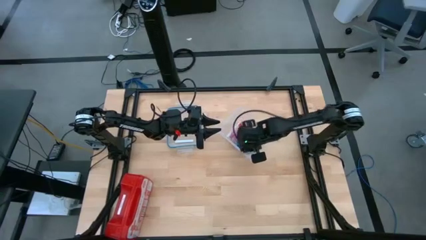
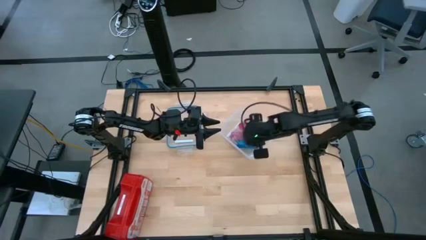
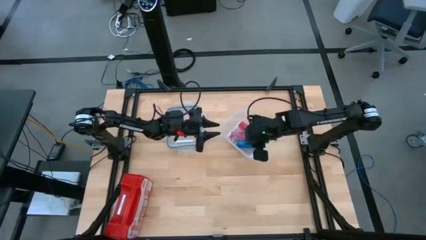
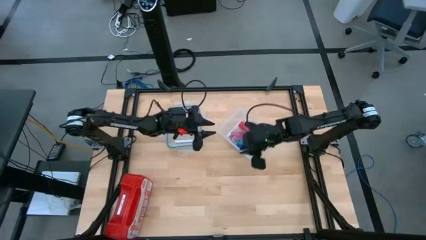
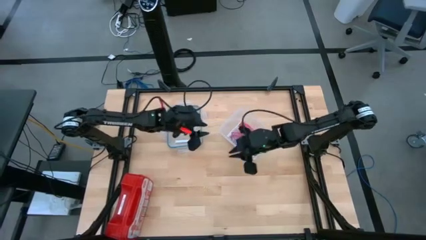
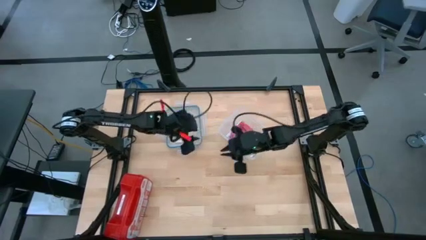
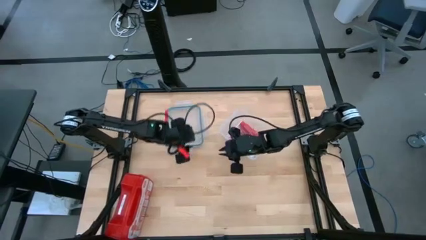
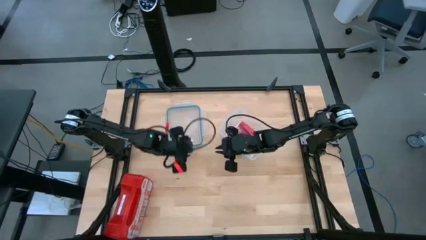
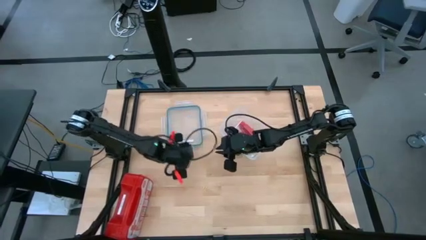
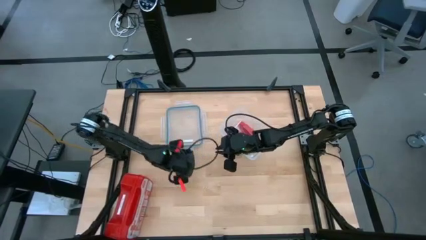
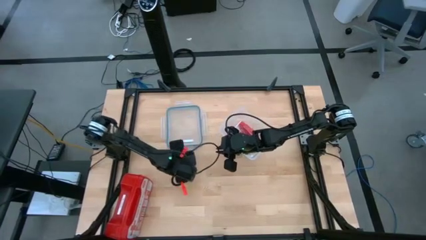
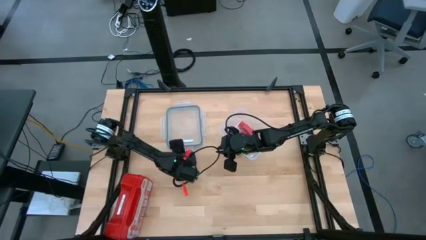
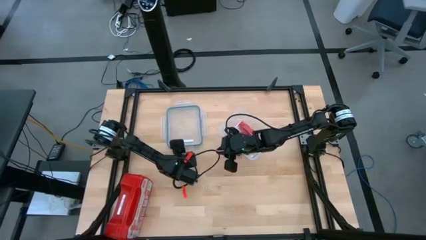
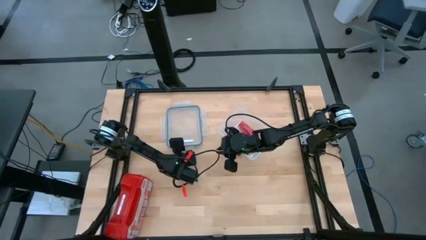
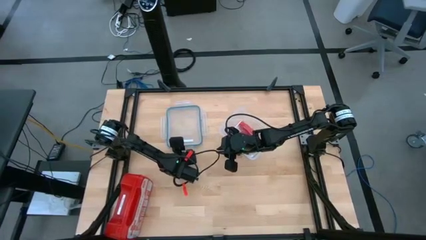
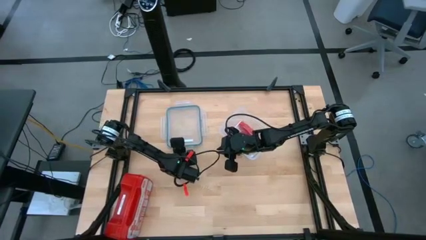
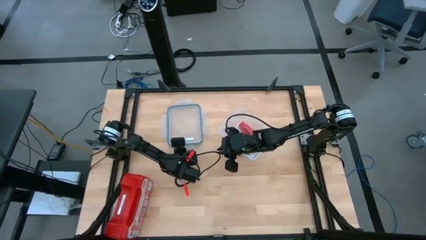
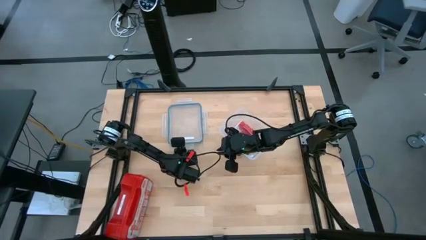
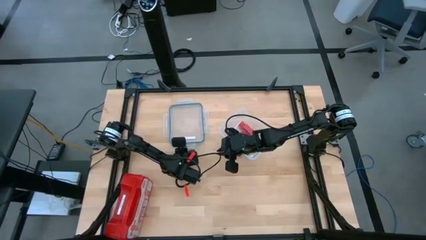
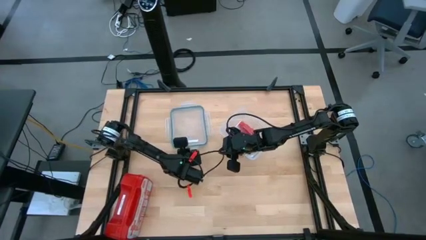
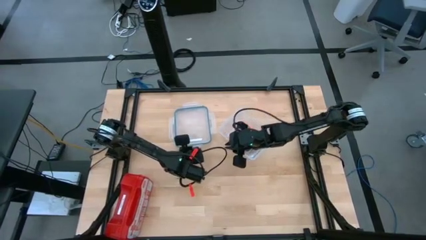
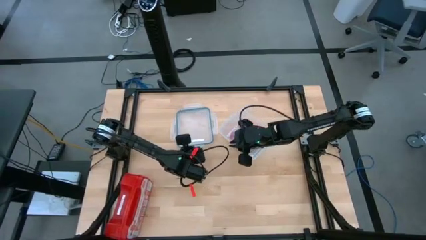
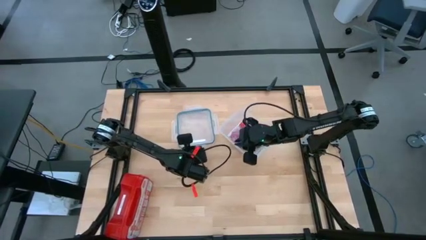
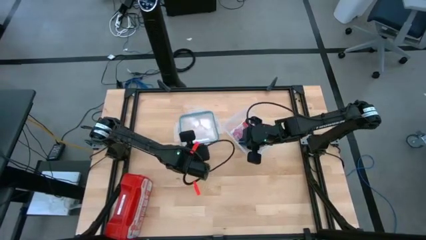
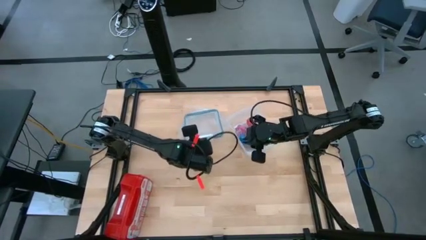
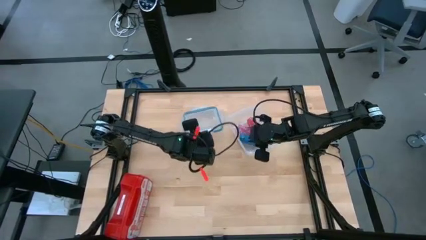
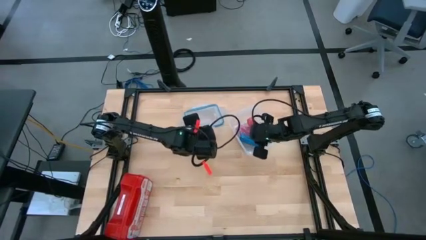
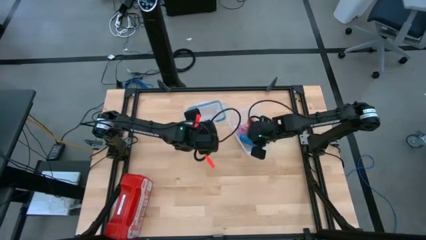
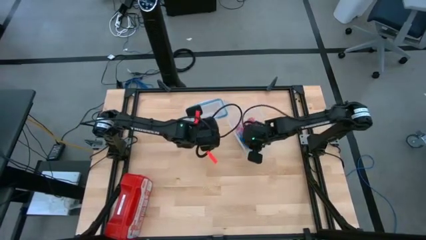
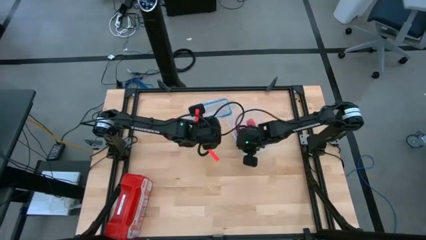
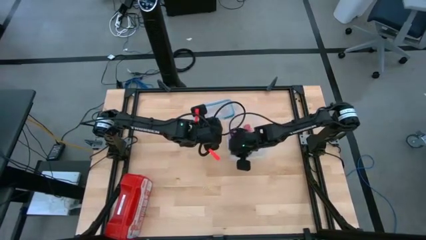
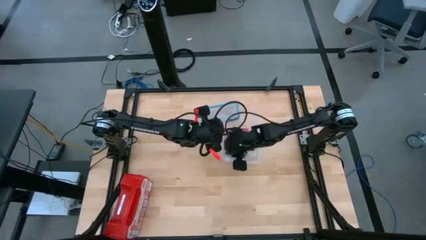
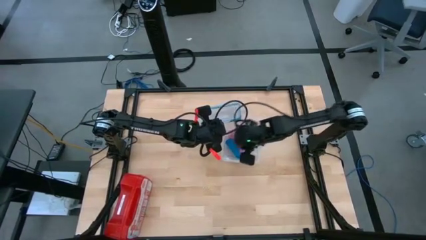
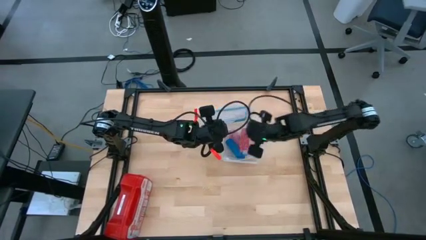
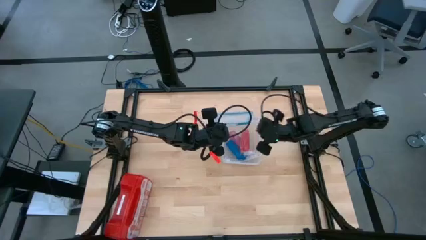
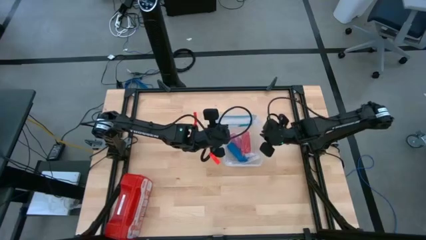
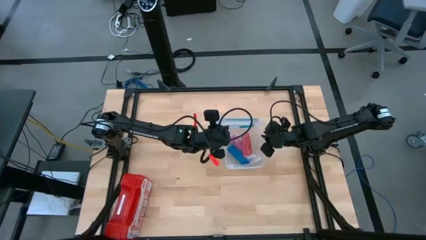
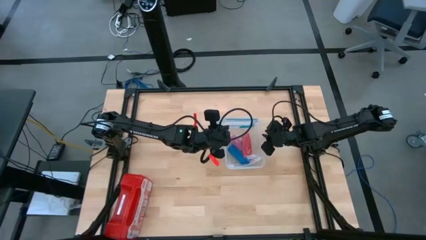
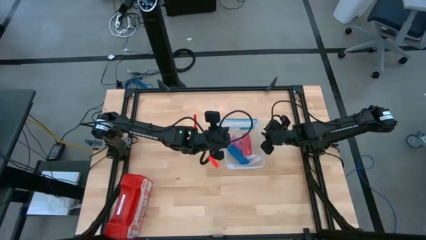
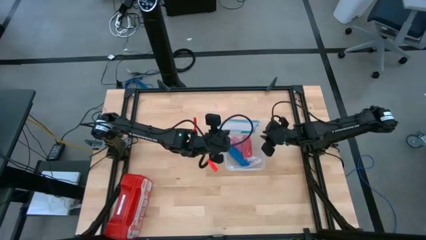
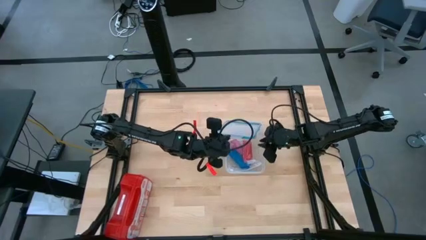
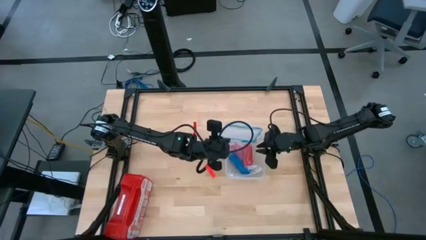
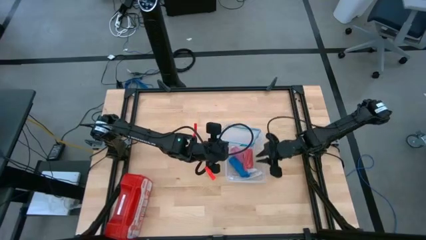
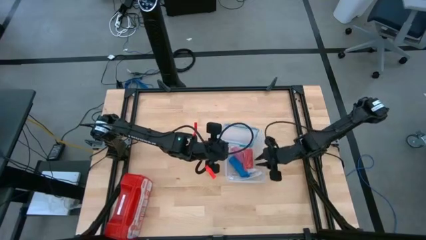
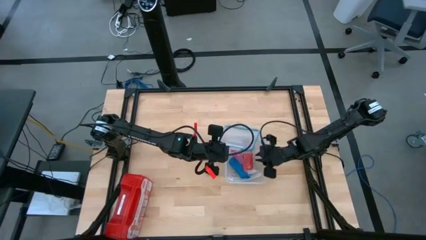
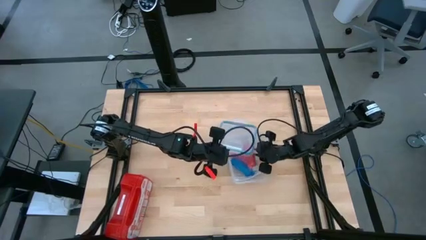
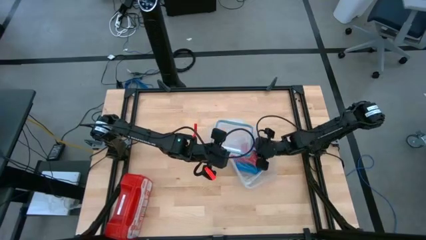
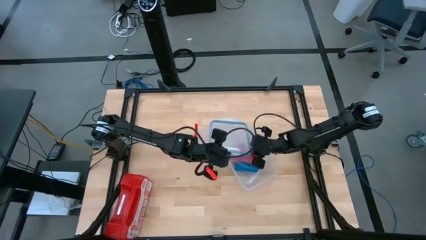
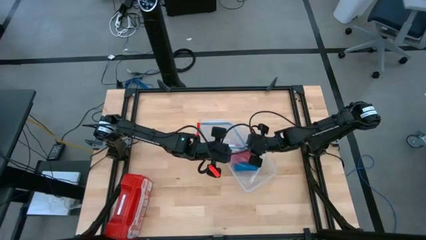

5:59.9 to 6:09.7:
Task: Roll bandage
Close the transparent container

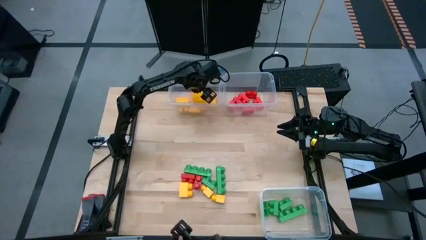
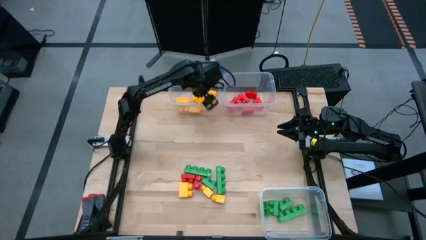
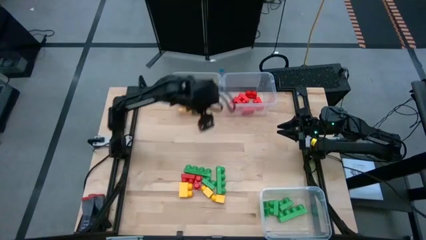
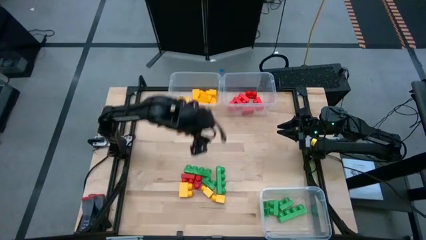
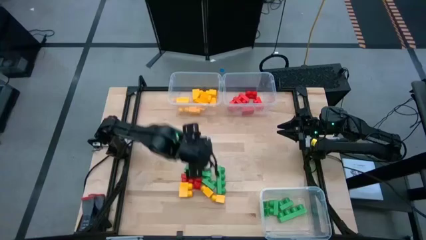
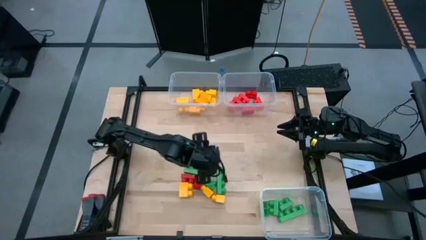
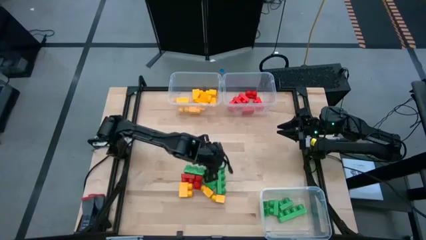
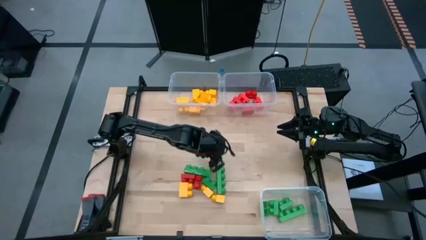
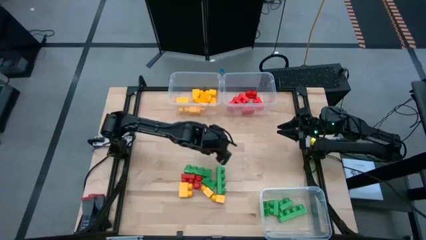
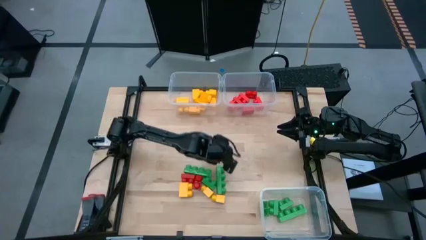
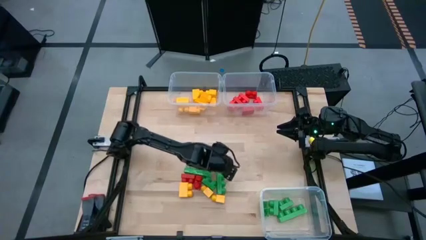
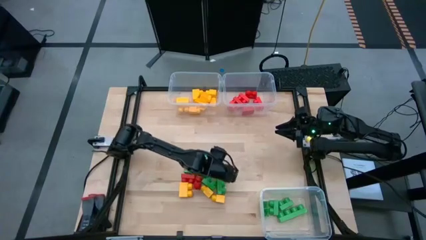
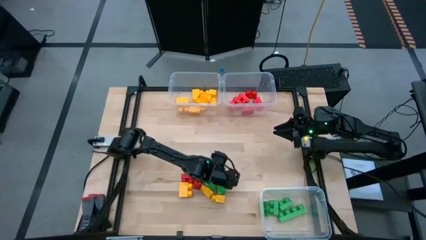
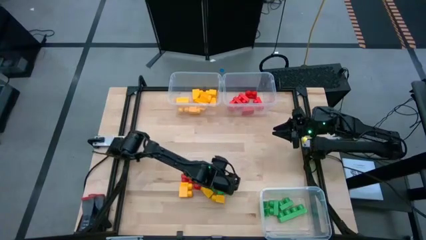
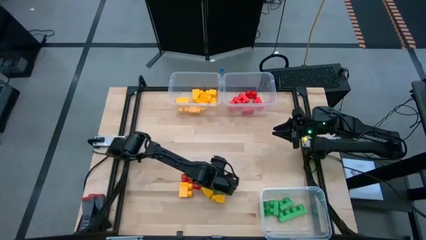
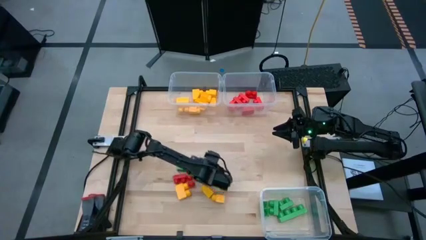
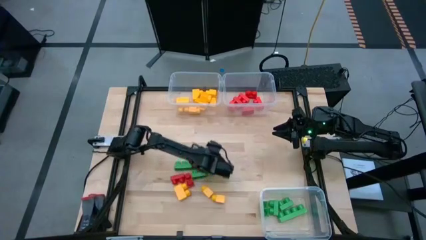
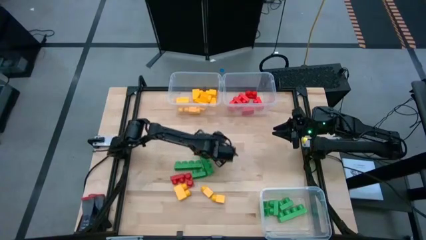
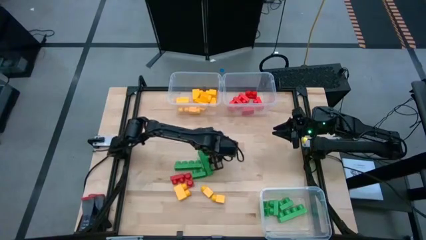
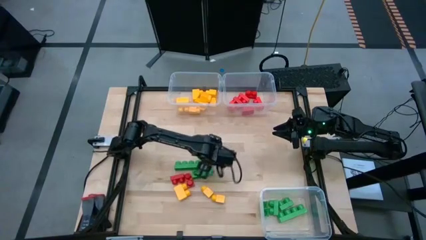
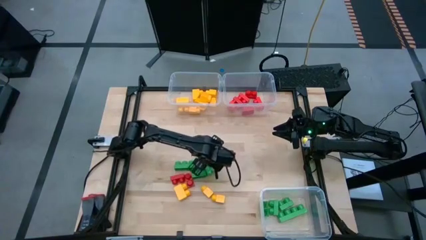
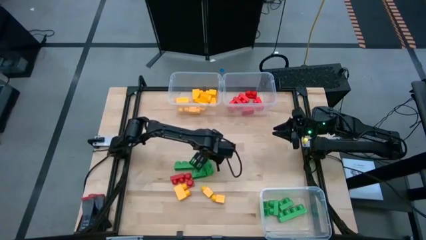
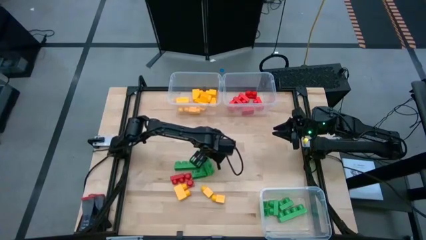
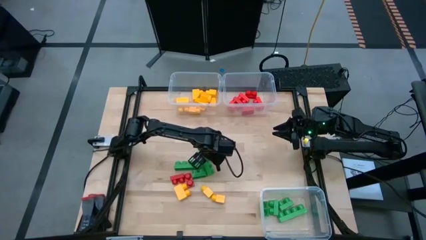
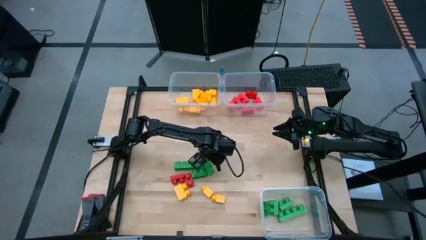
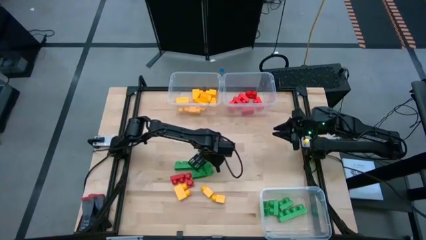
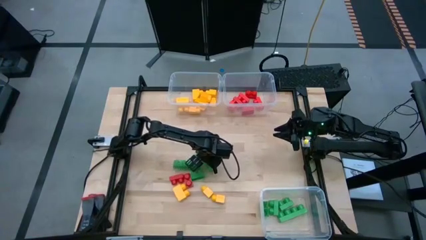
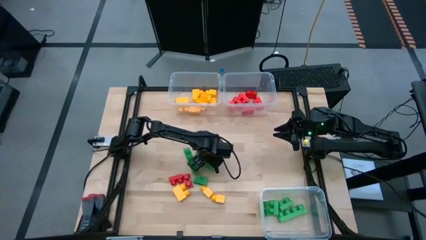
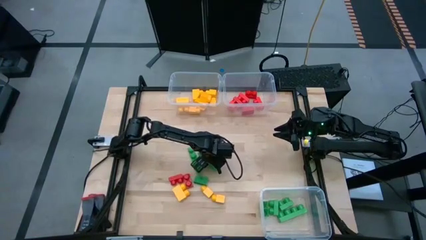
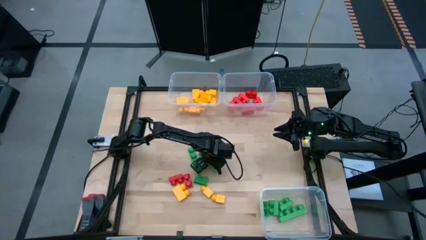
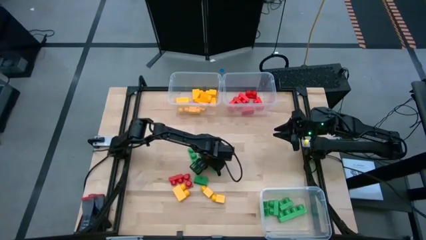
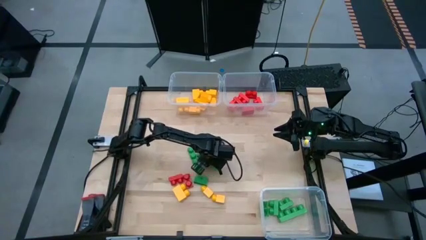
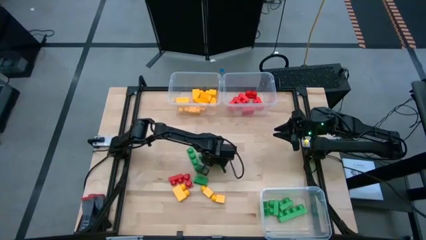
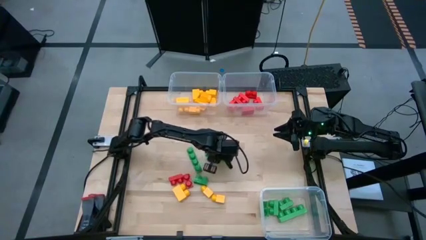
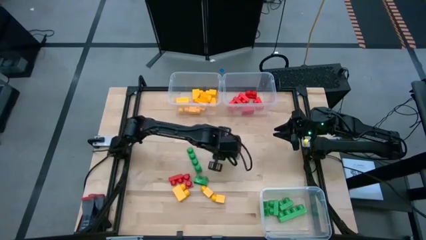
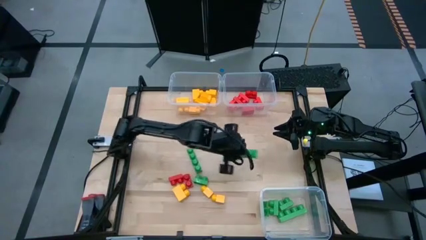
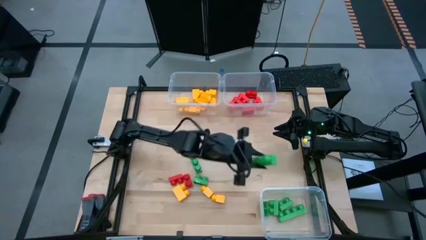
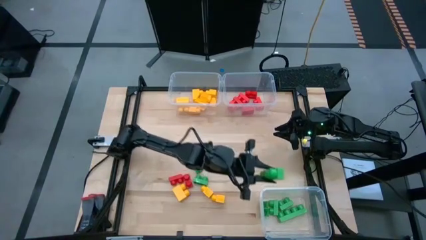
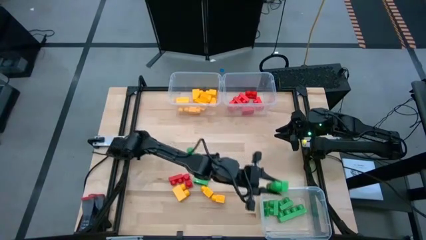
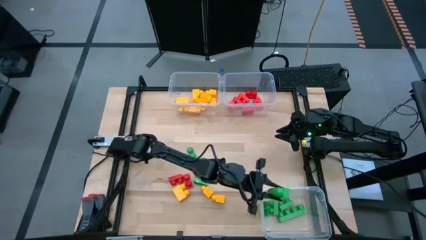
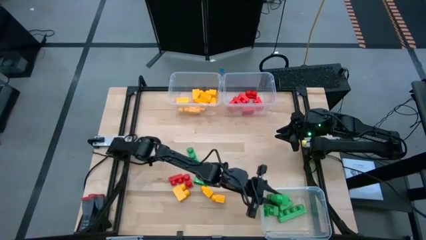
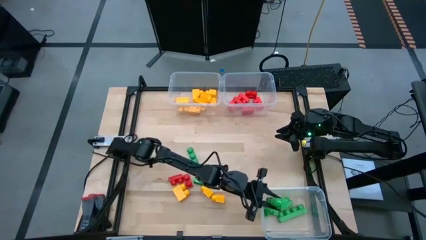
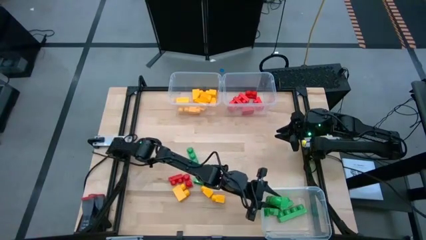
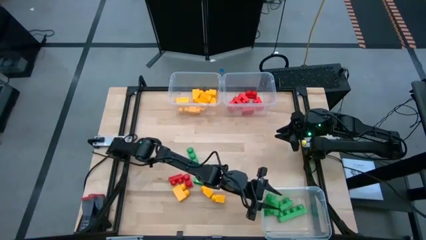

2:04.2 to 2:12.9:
Task: Sort blocks
Put the green game piece into the bottom right transparent bin
